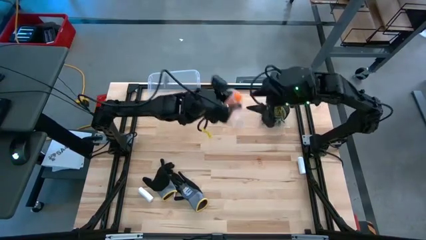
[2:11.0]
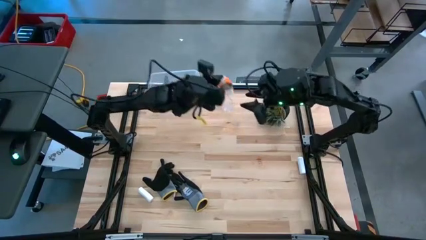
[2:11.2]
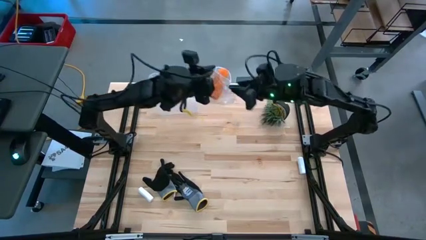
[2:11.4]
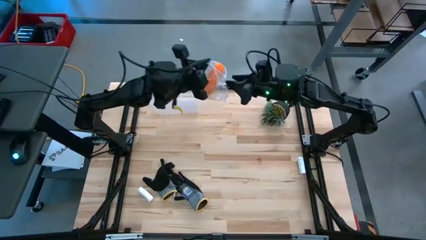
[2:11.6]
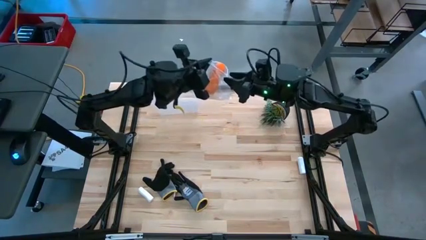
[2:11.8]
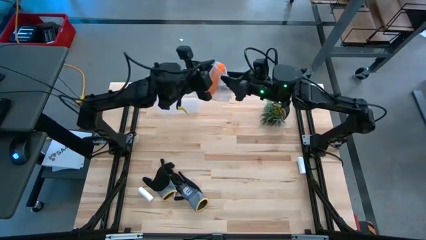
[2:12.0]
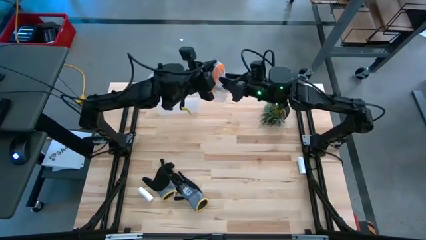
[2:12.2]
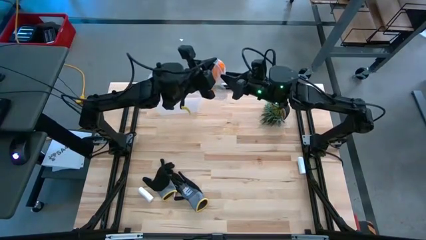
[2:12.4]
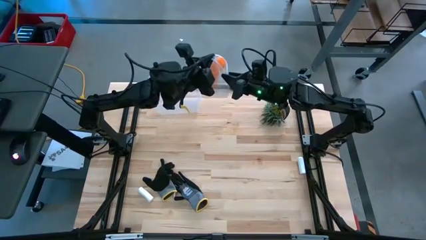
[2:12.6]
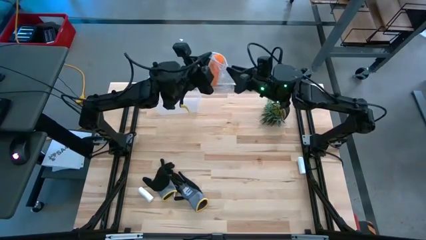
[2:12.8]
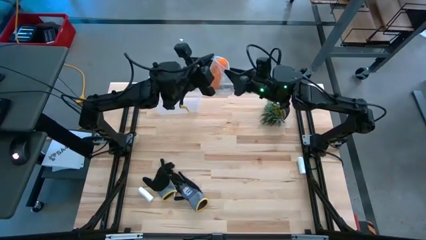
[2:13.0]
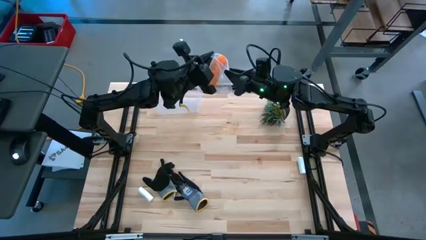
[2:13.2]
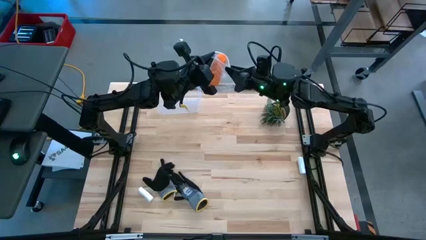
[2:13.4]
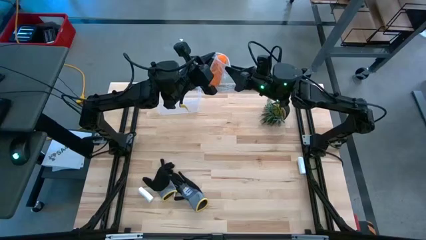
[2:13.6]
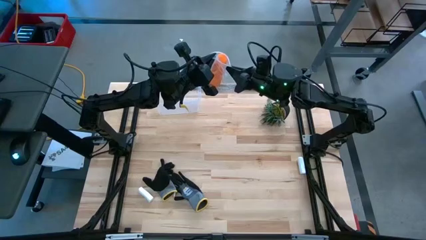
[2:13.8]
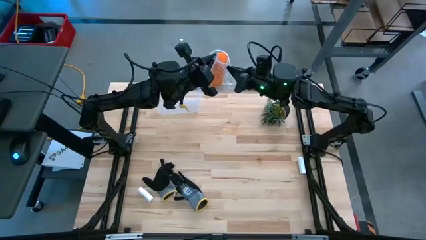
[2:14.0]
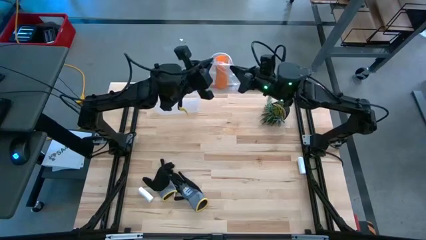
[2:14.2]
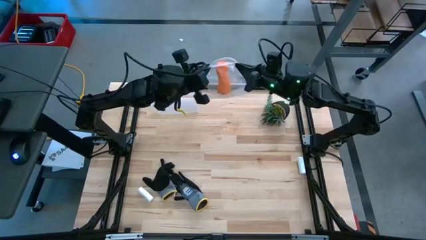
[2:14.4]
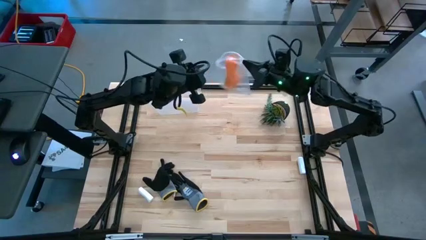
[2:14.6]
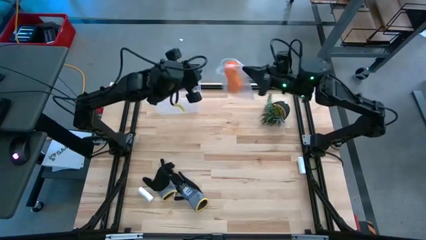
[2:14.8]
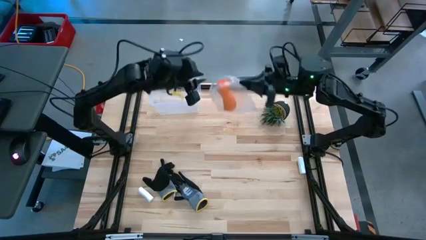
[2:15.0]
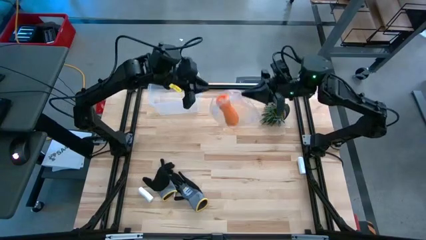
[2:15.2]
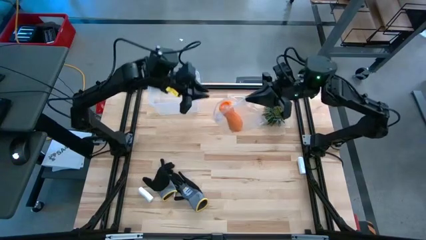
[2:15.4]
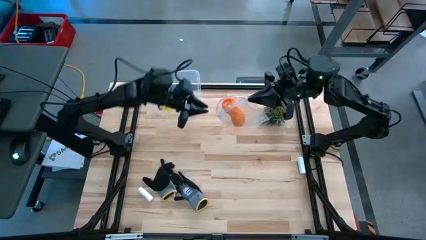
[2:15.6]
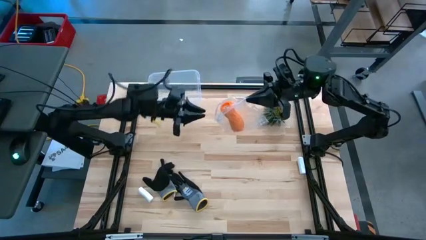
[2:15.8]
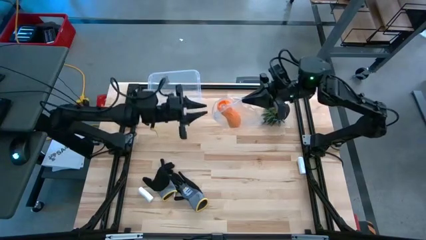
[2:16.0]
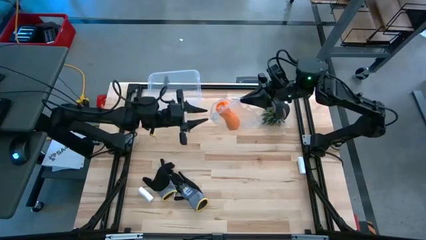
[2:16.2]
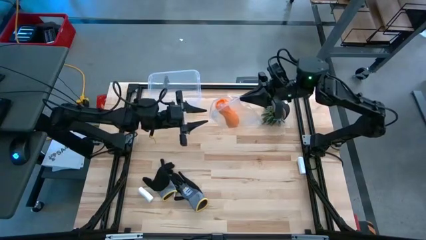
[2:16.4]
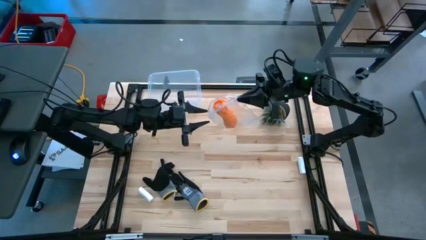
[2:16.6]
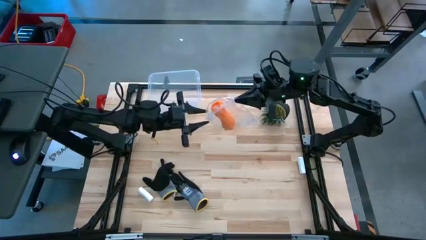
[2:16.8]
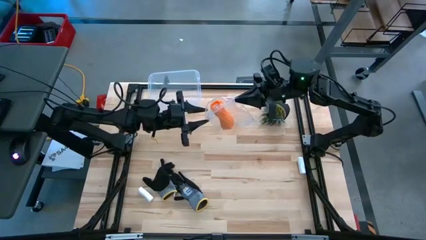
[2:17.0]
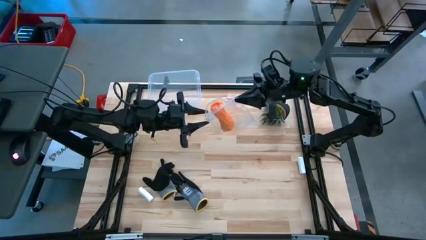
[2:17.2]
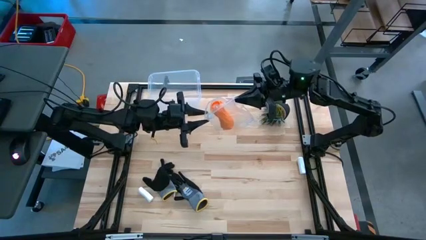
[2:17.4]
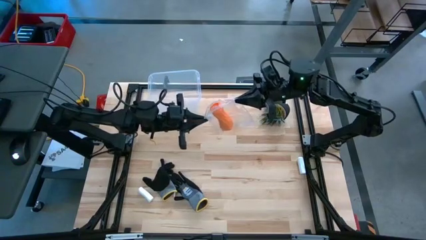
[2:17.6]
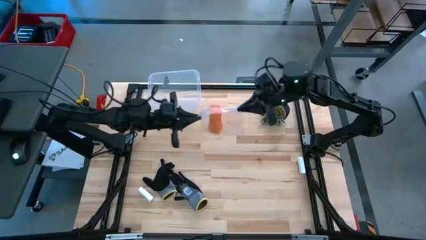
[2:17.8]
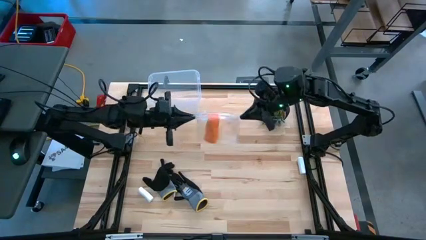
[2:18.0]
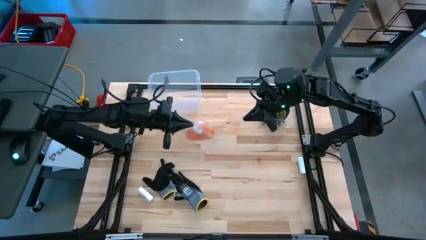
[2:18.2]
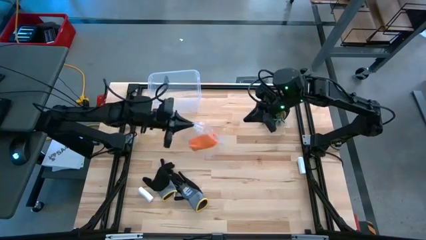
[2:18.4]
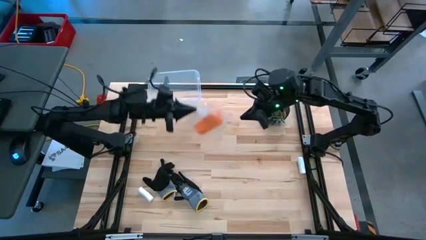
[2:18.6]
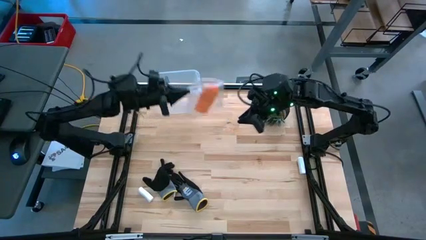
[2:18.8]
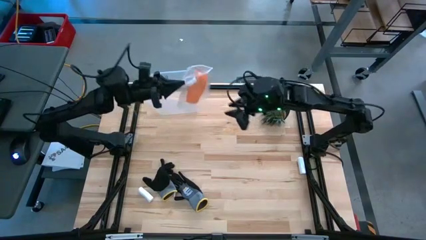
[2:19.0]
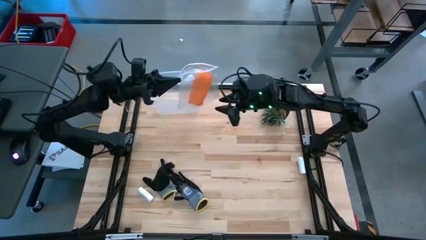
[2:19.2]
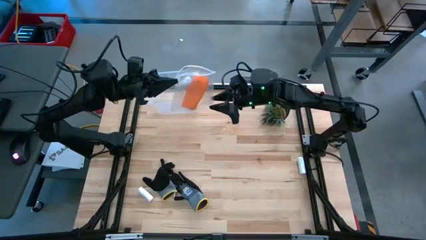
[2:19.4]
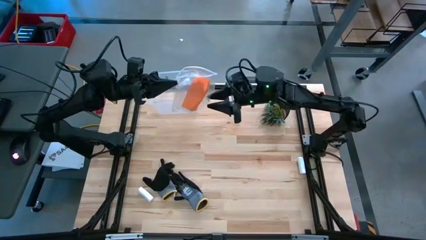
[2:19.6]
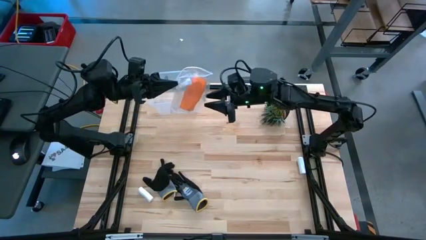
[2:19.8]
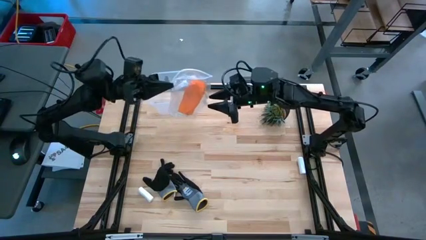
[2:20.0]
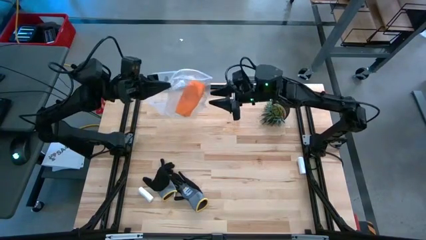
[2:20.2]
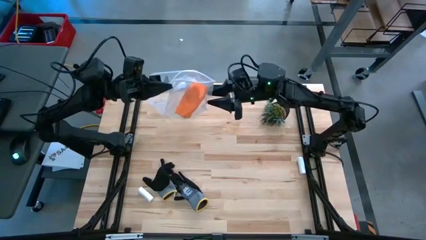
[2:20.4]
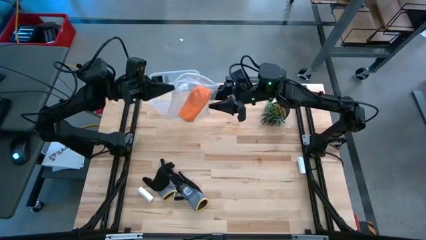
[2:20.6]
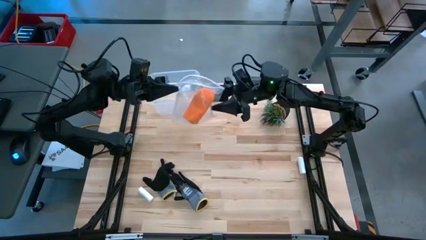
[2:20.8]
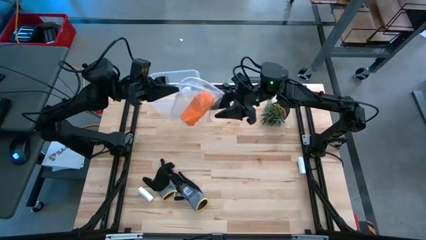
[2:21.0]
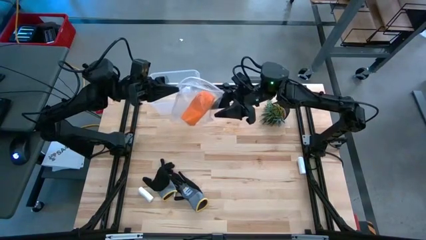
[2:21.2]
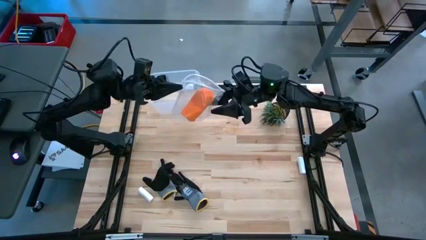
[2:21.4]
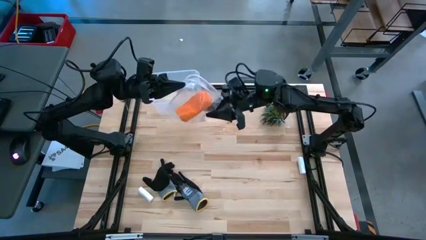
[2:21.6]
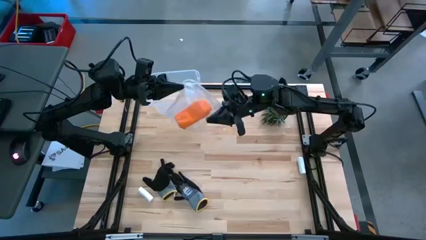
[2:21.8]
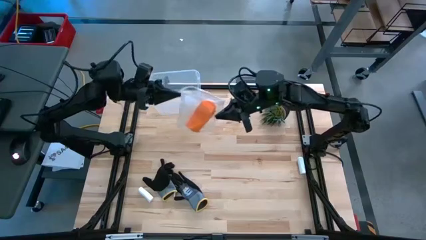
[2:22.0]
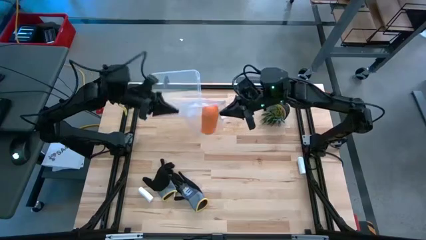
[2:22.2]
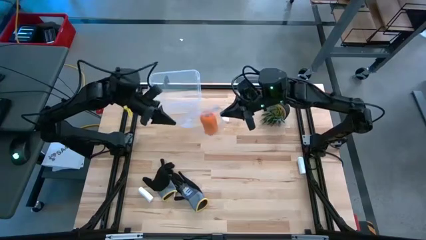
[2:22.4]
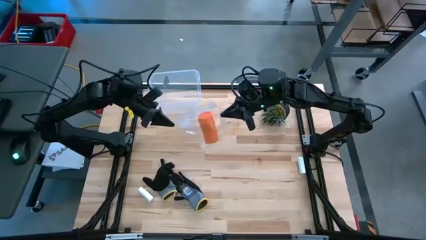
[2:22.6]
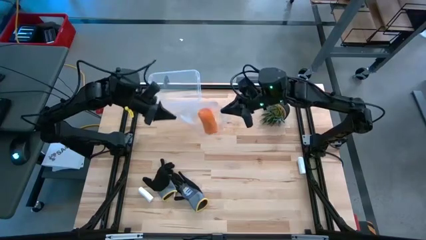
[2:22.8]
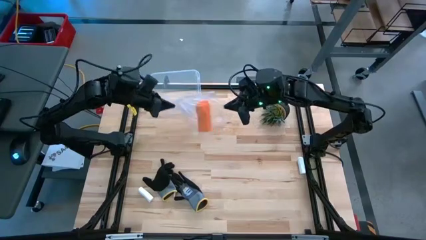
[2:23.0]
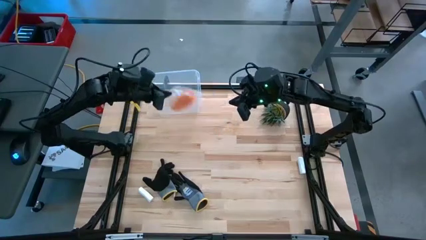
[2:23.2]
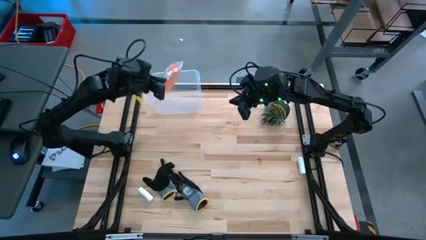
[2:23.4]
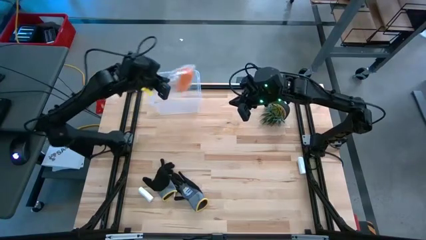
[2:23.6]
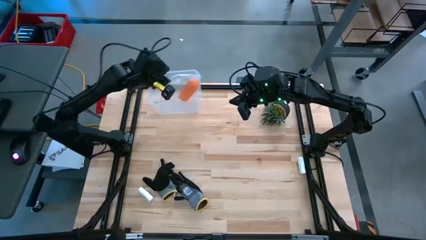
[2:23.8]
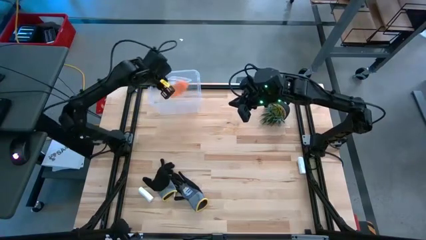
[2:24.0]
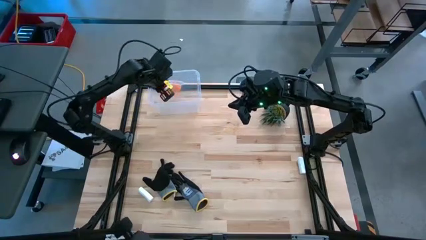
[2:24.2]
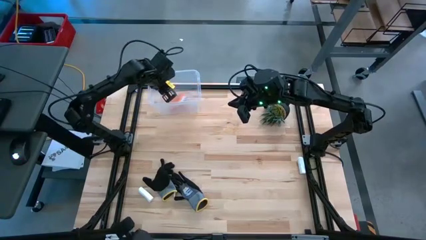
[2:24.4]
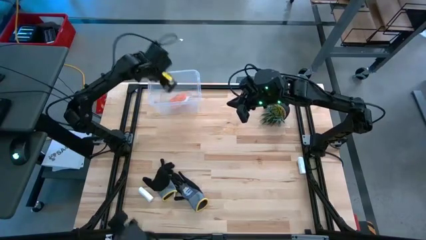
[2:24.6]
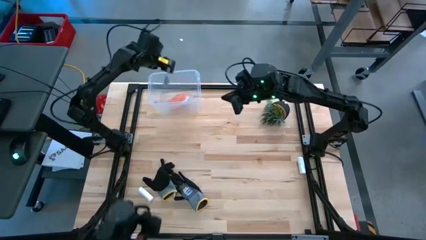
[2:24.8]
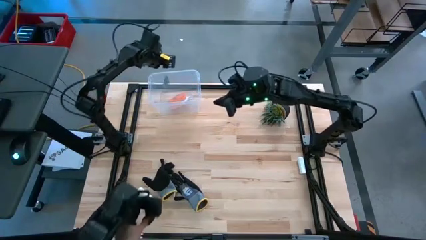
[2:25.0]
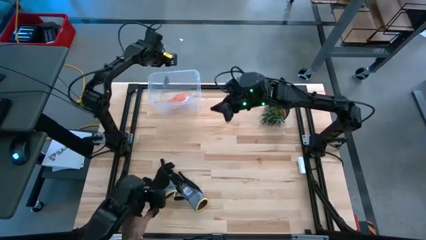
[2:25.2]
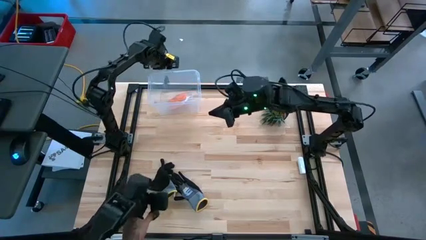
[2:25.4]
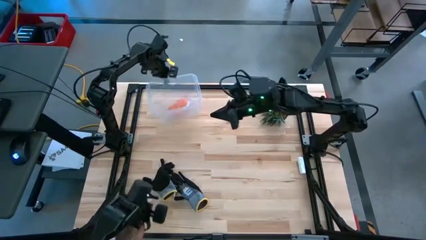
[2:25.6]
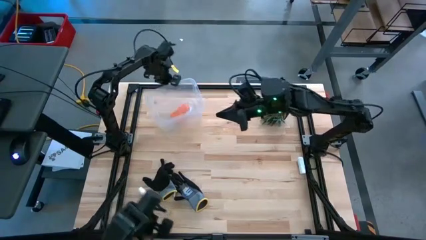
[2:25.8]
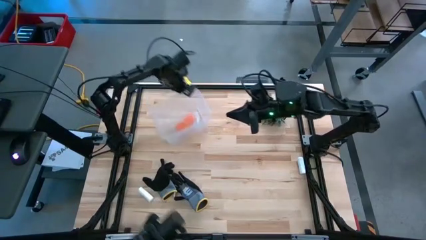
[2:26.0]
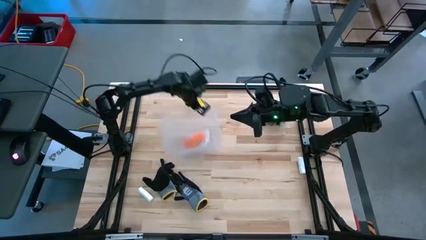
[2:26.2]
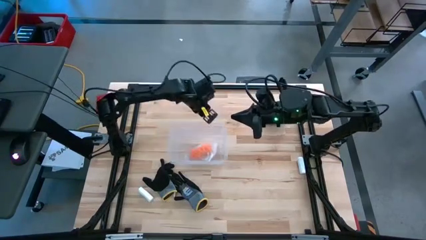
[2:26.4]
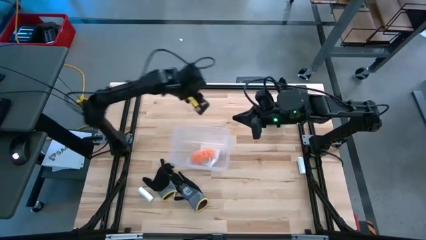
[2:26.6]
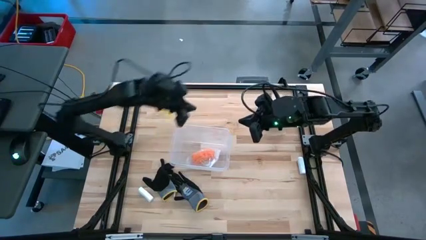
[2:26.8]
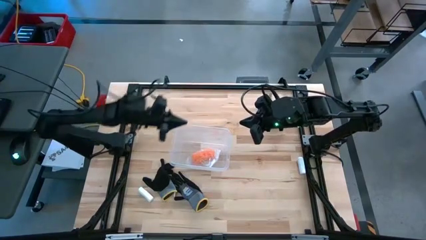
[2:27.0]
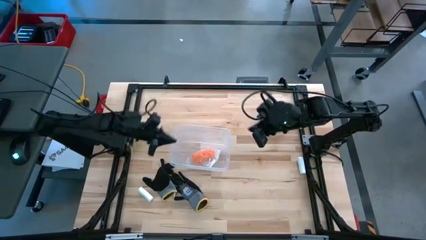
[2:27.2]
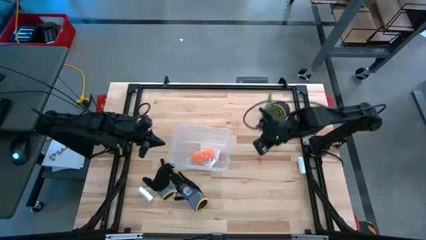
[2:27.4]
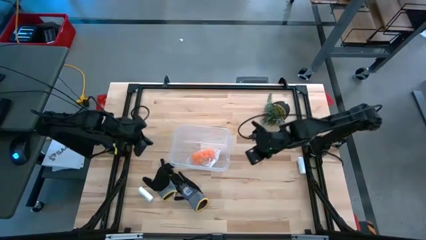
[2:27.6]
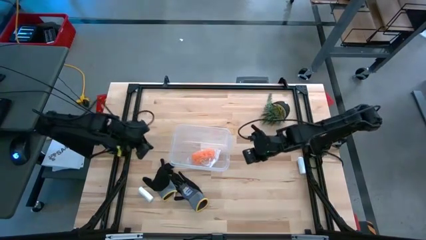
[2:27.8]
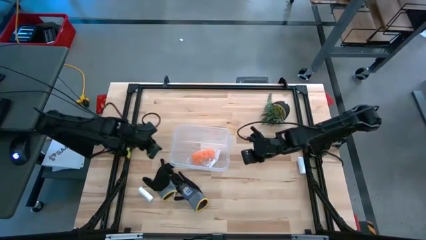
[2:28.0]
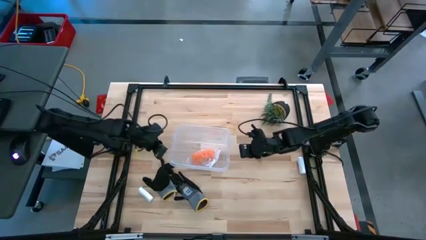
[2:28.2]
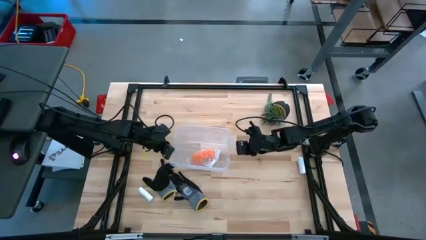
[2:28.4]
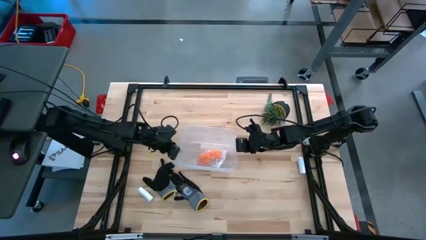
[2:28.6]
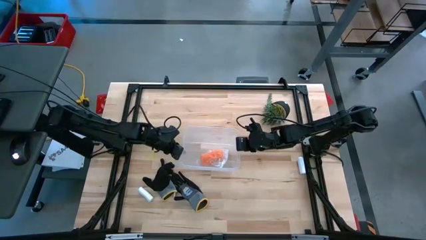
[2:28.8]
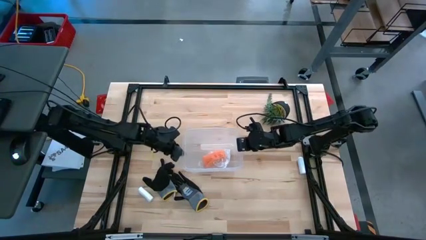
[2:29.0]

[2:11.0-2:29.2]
Task: Roll bandage
Put the transparent zip bag into the transparent bin
